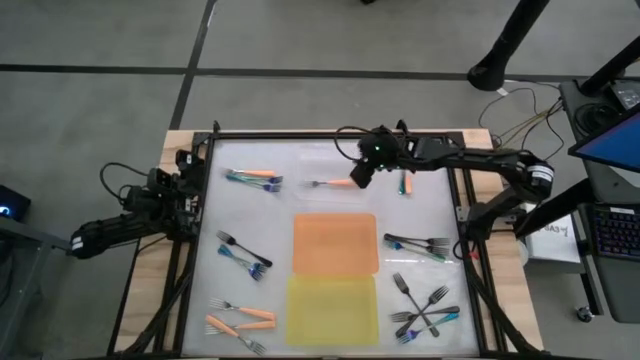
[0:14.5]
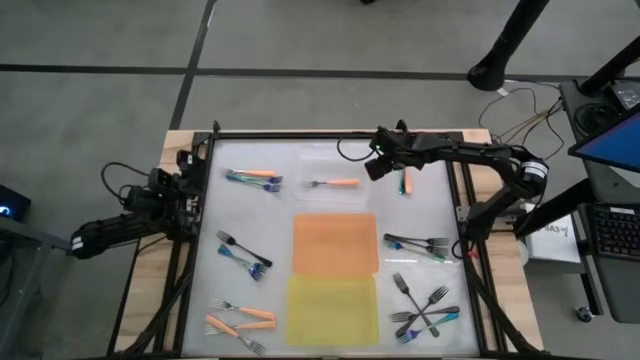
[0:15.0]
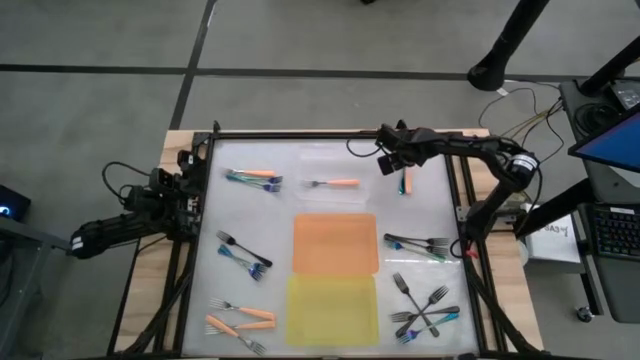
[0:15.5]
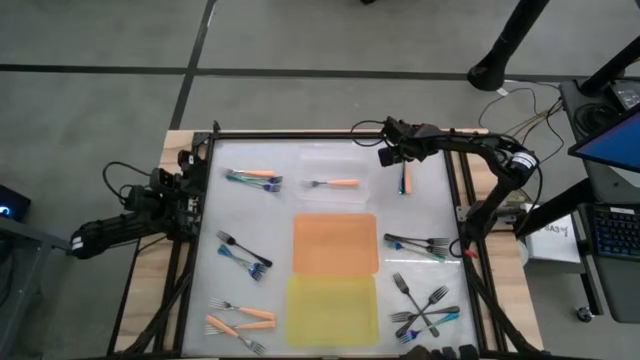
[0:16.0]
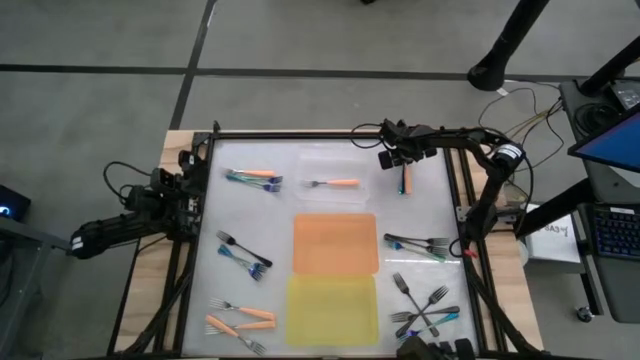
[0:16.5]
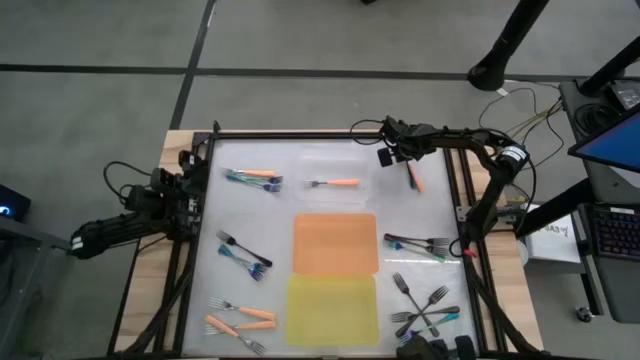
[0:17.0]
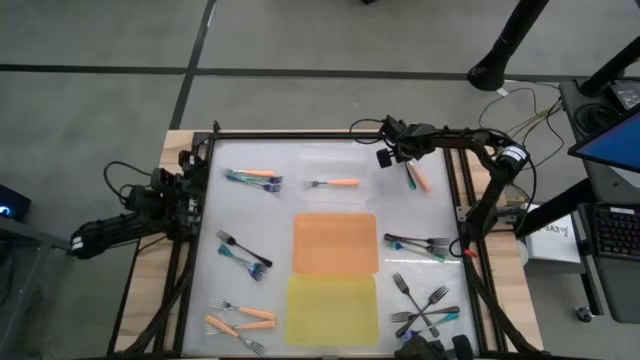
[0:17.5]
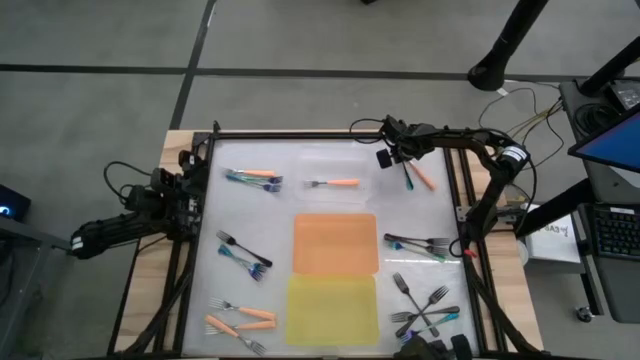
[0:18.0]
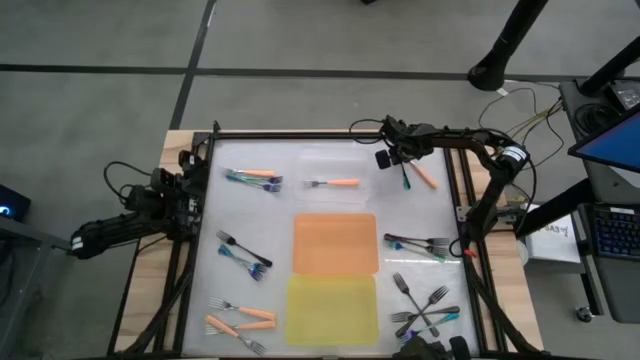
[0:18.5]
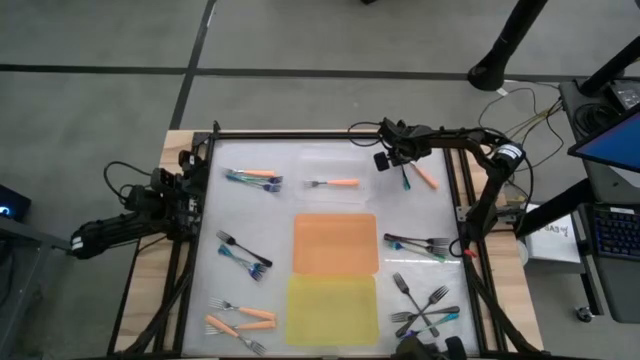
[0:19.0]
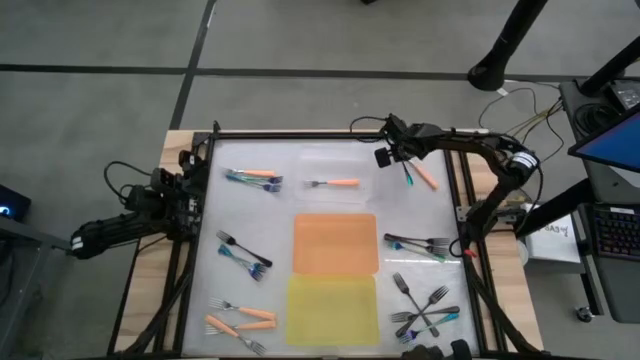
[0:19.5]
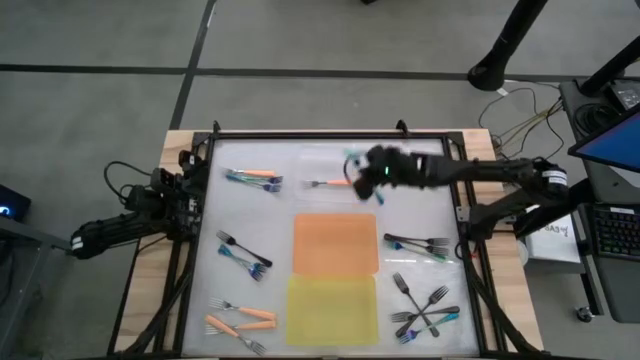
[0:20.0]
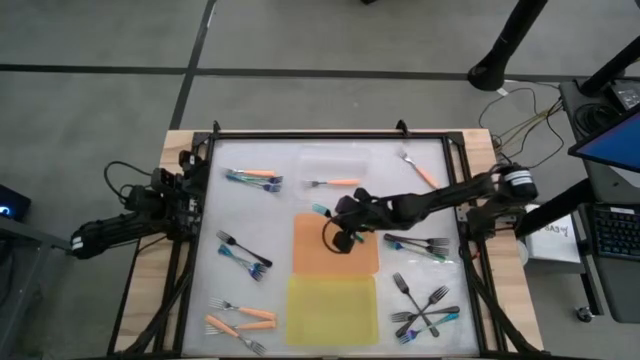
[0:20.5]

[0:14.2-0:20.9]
Task: Sort silverware by color (type)
Put the blue fork into the orange bin

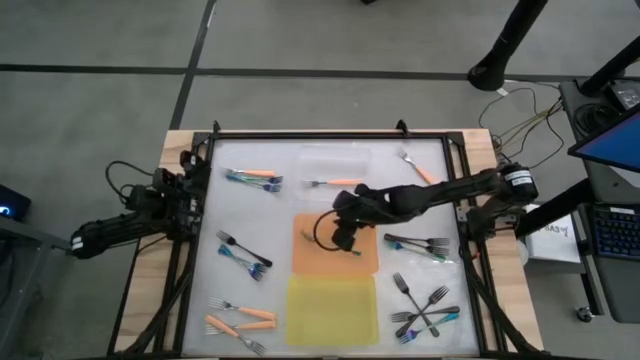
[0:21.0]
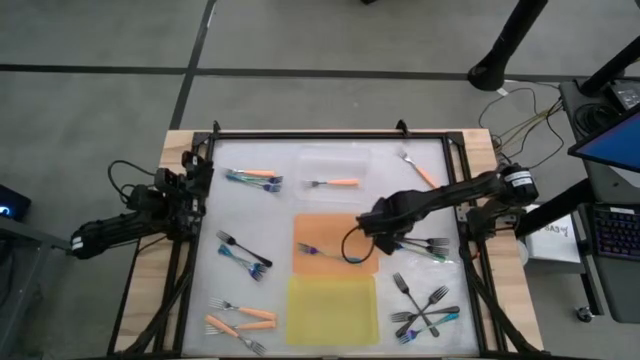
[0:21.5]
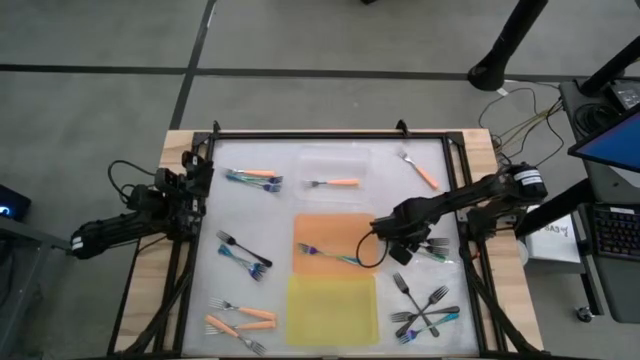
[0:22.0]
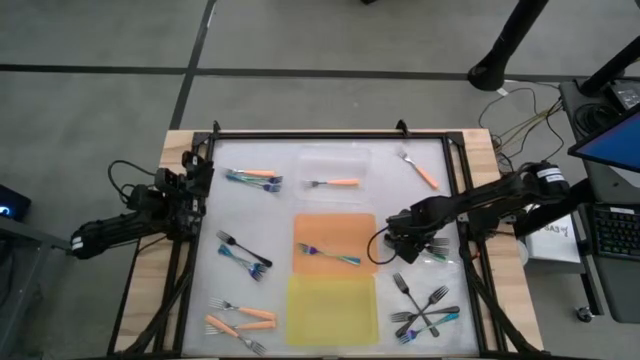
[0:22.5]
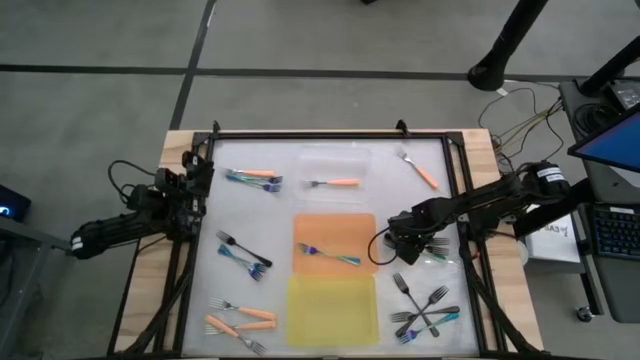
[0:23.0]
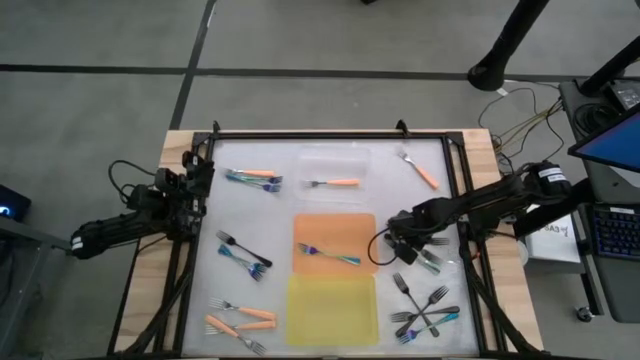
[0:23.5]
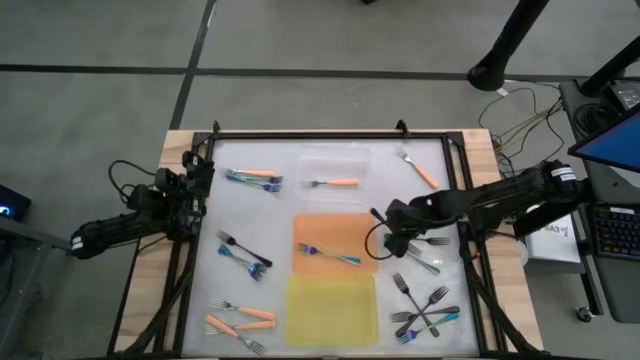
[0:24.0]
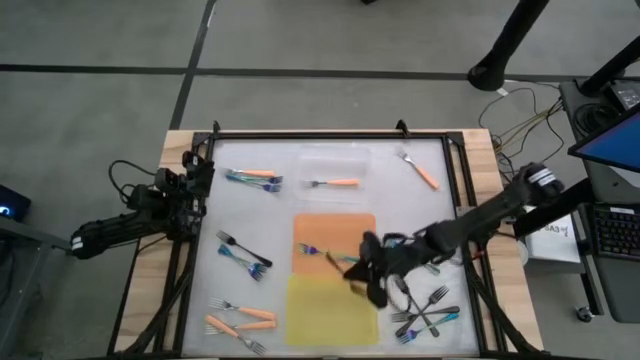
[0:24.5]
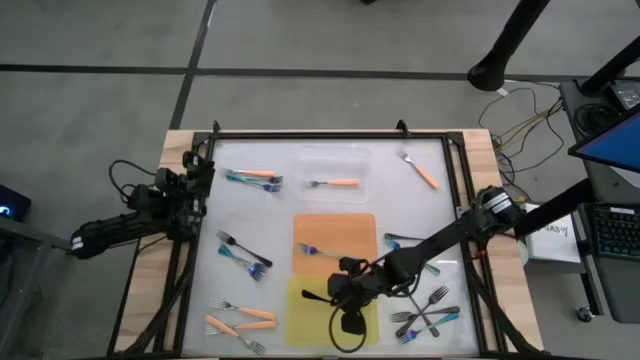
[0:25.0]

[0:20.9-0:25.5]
Put the black fork into the yellow bin

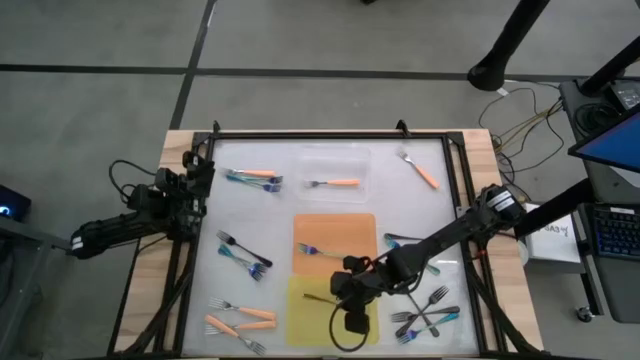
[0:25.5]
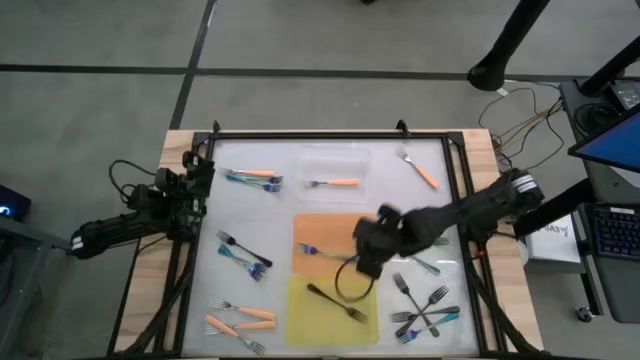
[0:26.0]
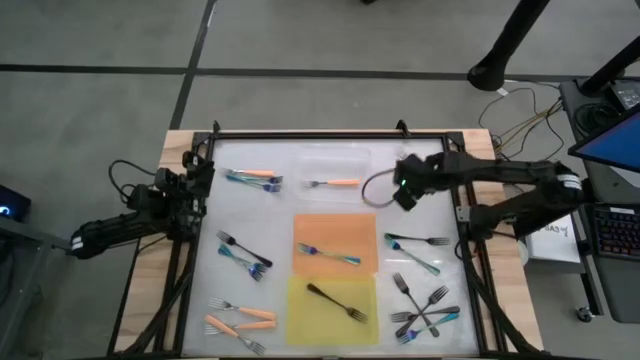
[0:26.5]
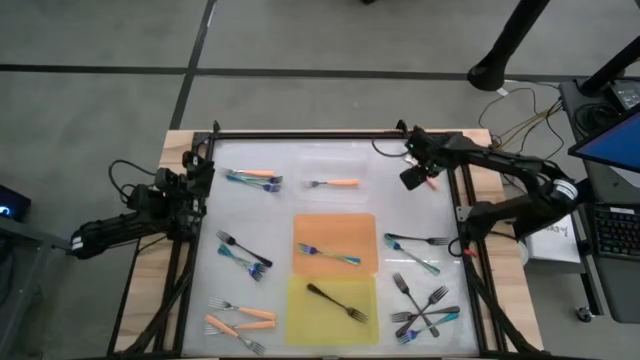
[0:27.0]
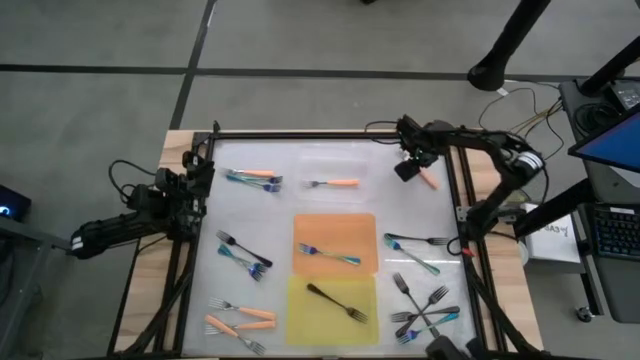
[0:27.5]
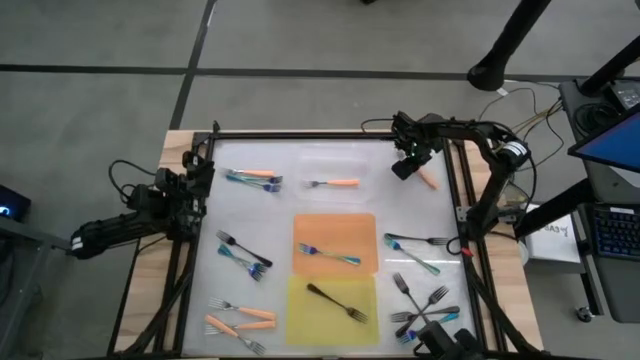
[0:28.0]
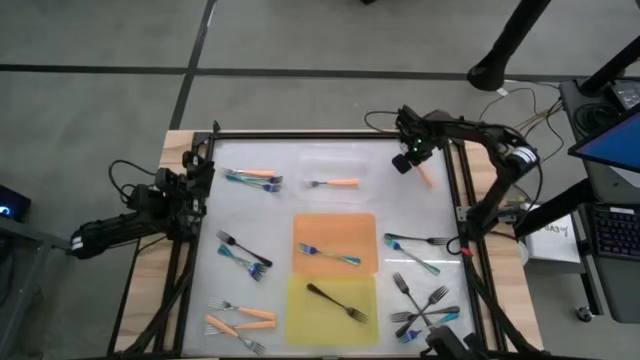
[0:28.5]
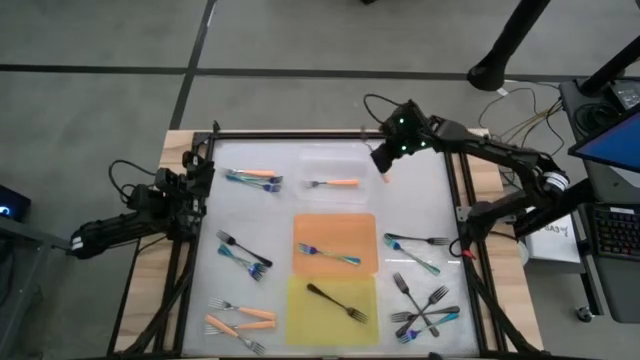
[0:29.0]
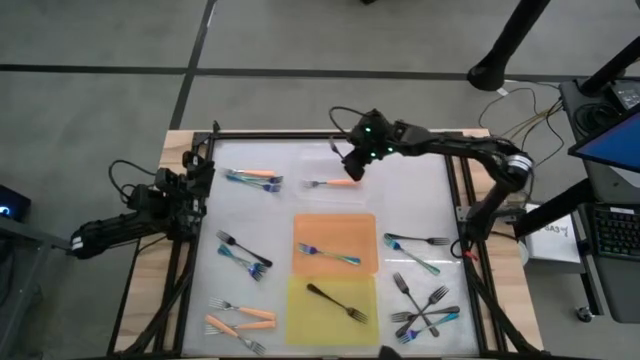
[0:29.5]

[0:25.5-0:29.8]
Put the orange fork into the white bin

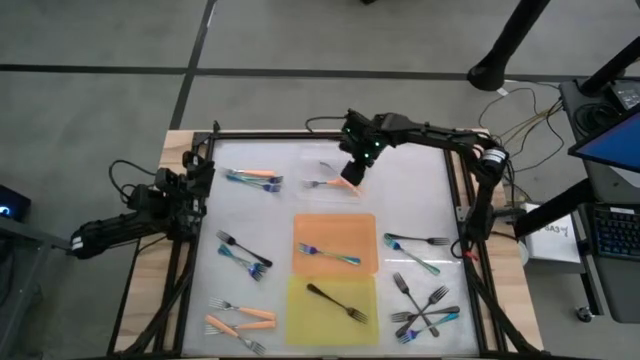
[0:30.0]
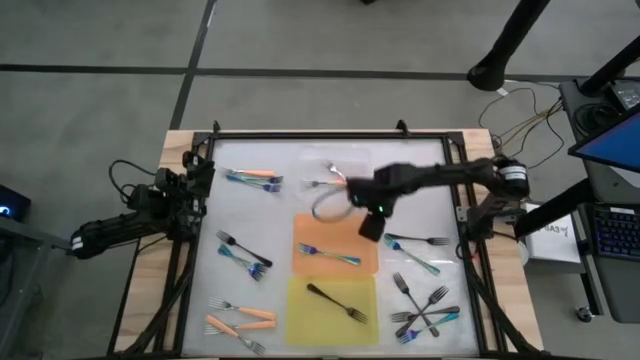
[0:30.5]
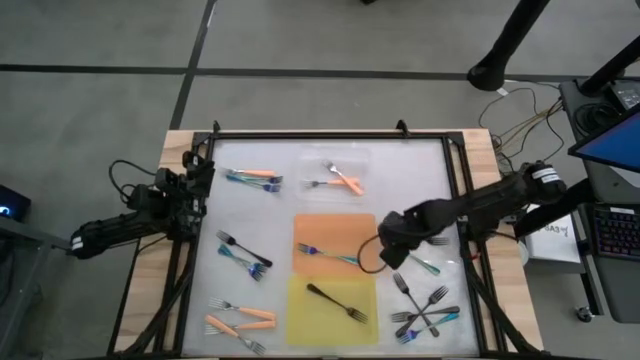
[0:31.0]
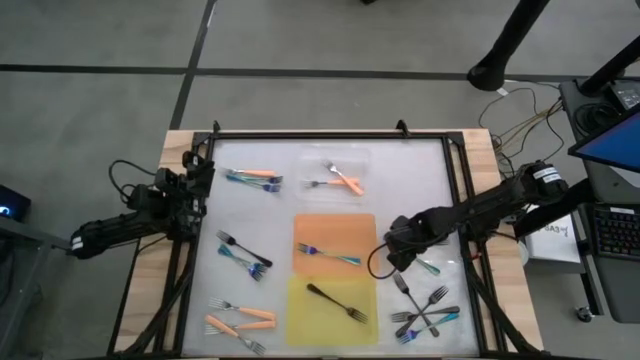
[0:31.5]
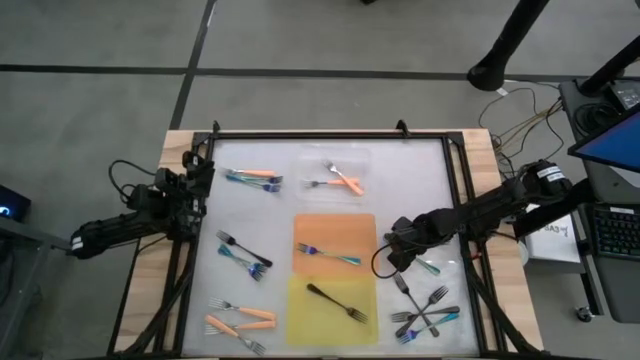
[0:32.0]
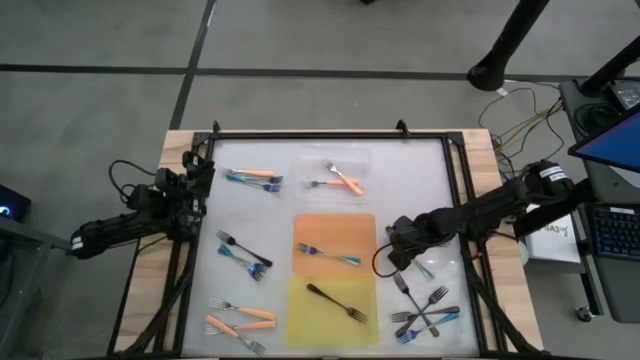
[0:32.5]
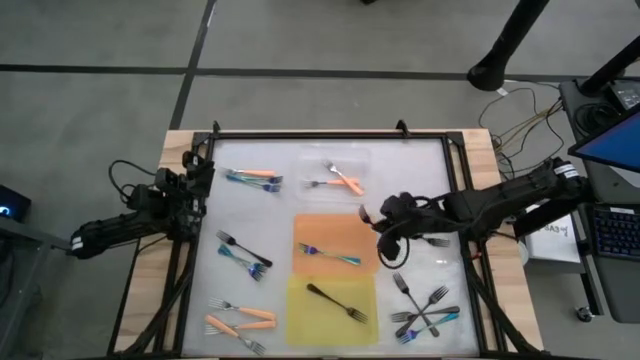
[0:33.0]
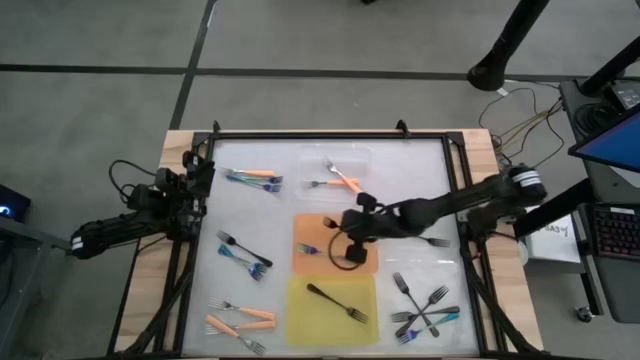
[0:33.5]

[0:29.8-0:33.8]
Put the blue fork into the orange bin

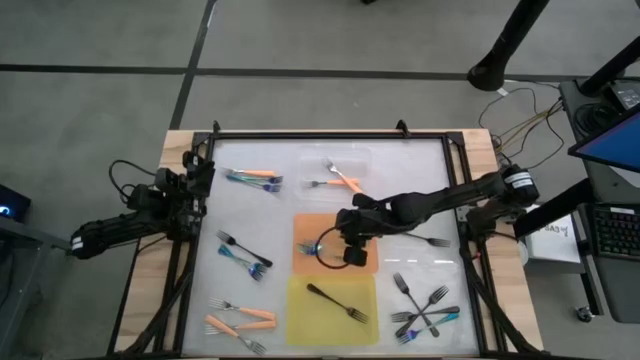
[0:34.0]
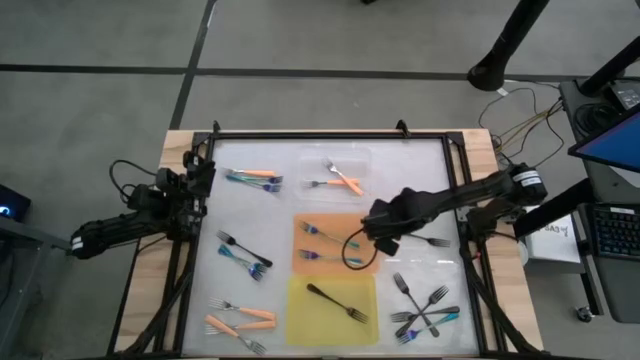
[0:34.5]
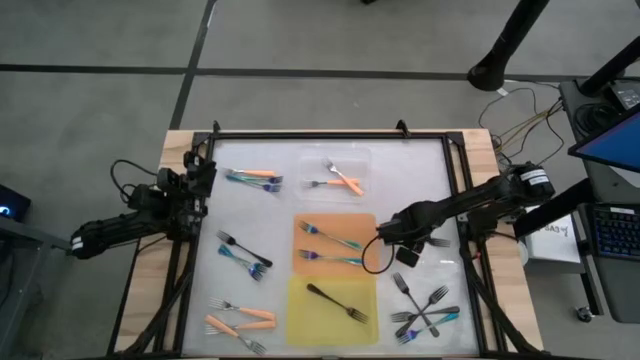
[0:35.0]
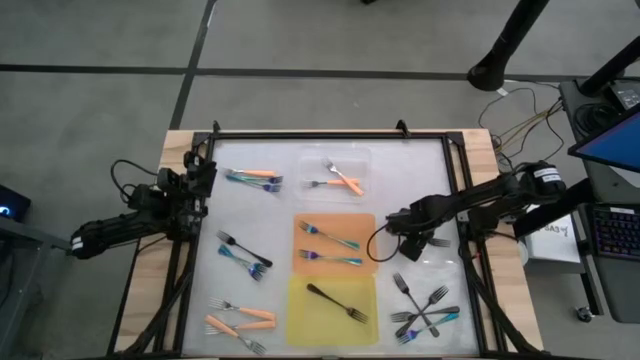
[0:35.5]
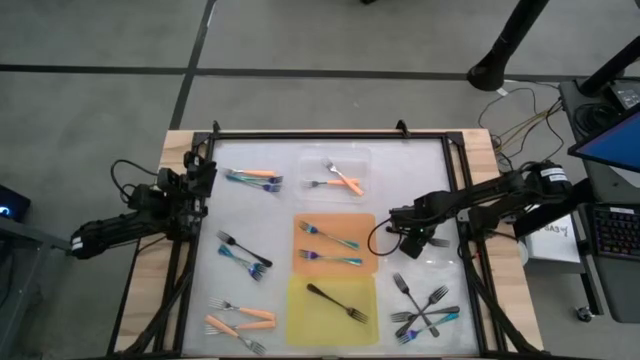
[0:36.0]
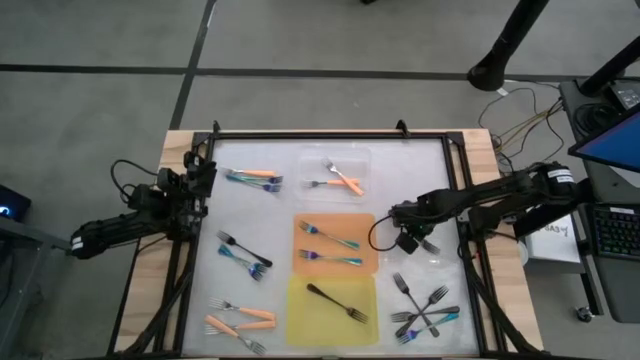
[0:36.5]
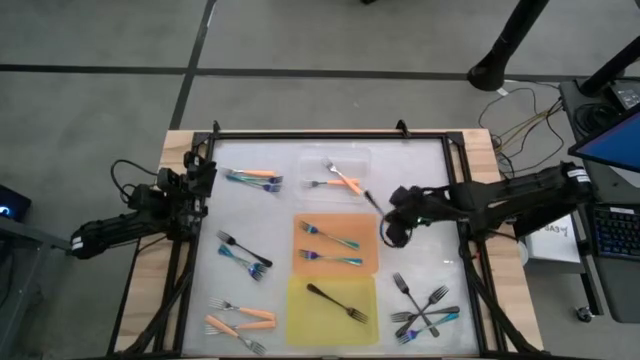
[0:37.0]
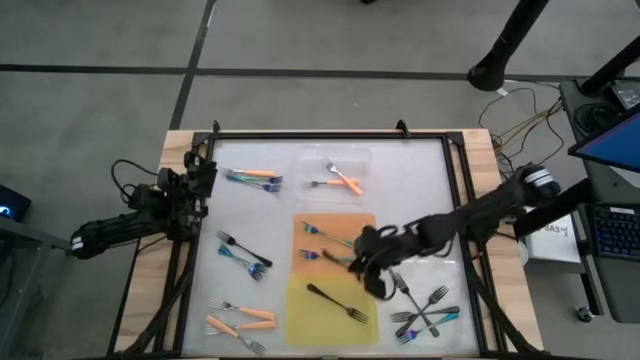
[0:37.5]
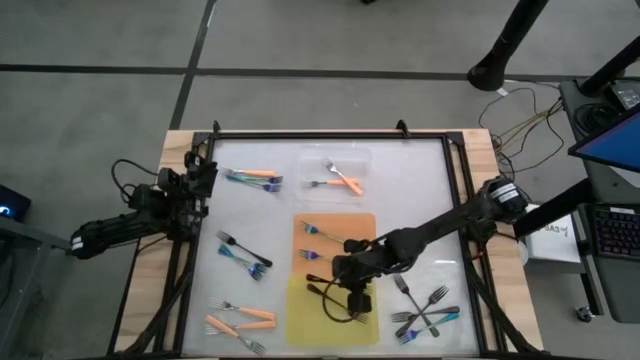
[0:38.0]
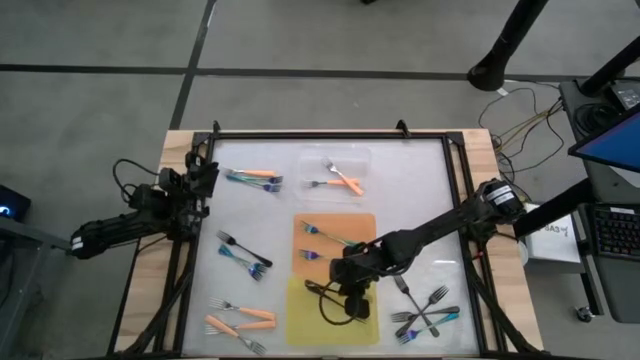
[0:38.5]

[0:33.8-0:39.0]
Put the black fork into the yellow bin
